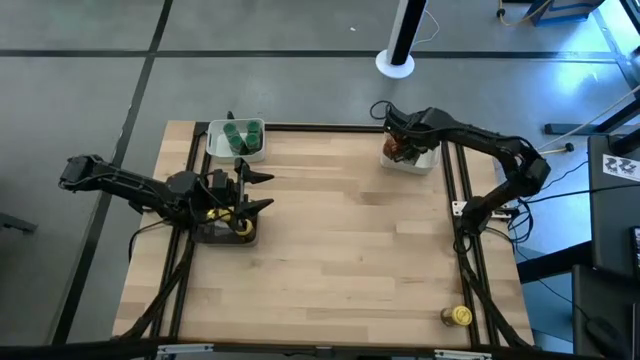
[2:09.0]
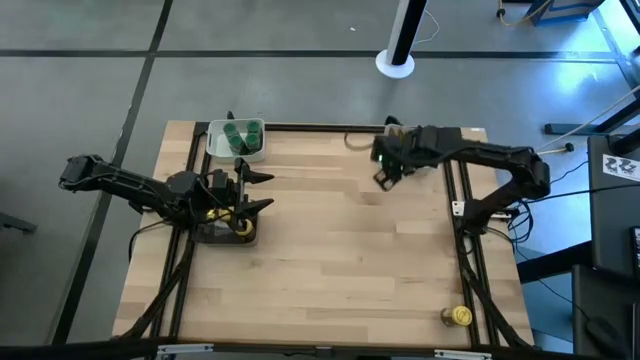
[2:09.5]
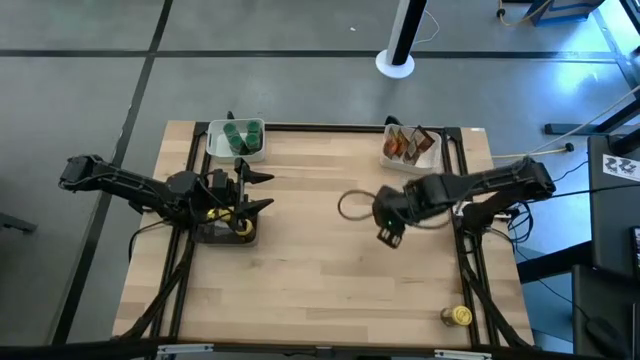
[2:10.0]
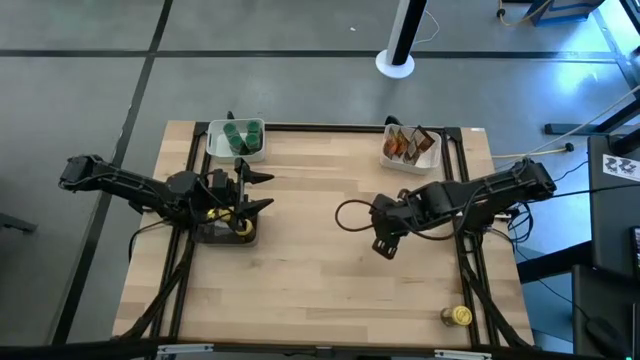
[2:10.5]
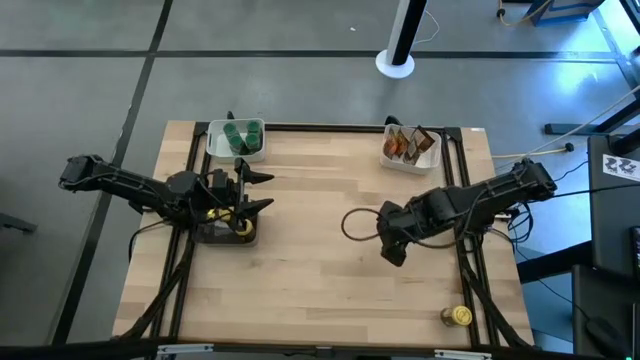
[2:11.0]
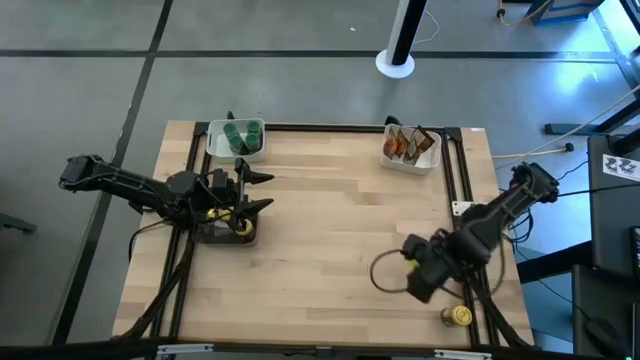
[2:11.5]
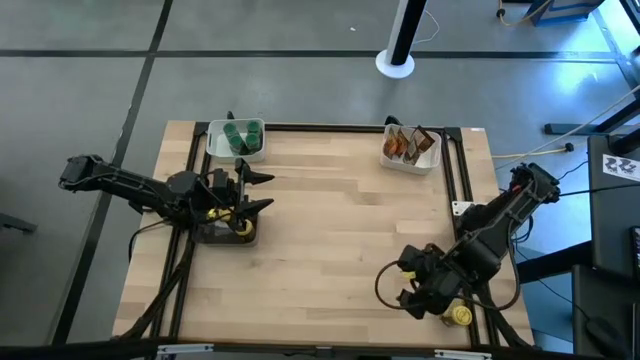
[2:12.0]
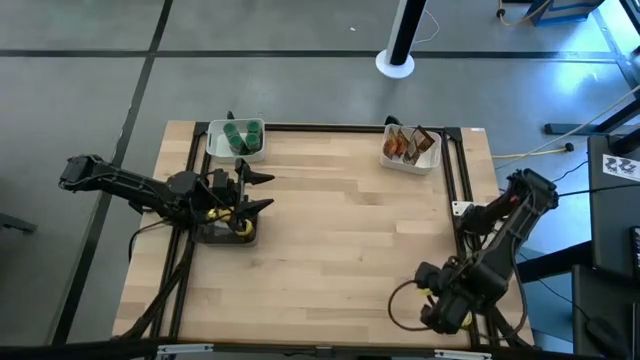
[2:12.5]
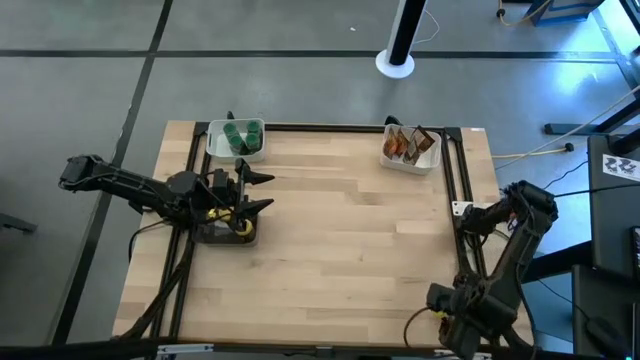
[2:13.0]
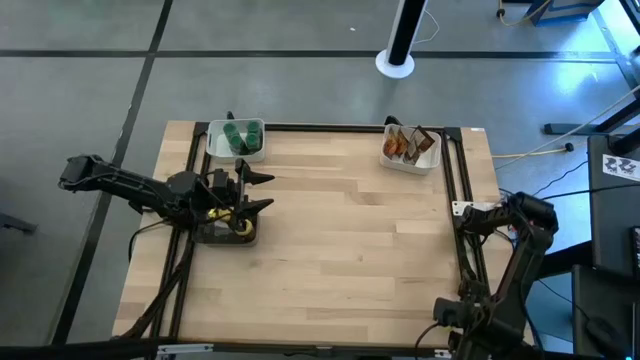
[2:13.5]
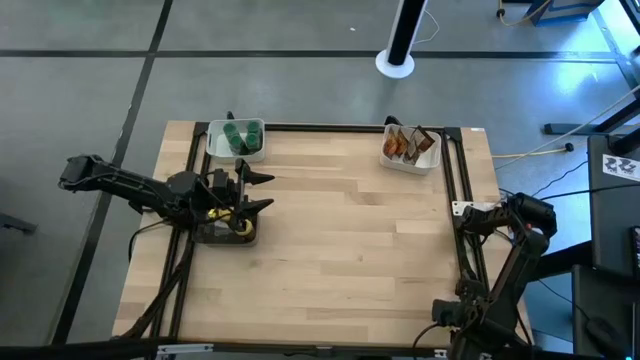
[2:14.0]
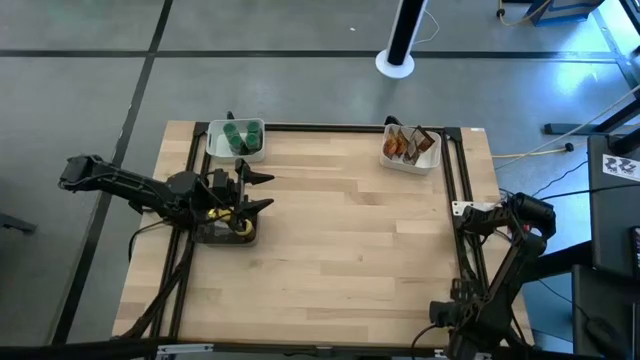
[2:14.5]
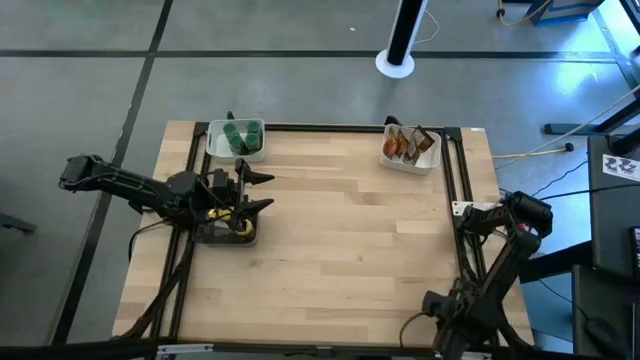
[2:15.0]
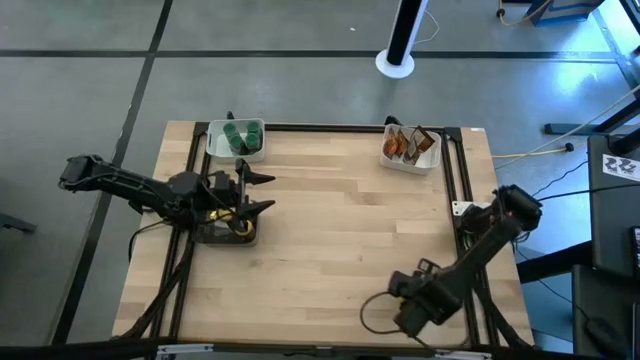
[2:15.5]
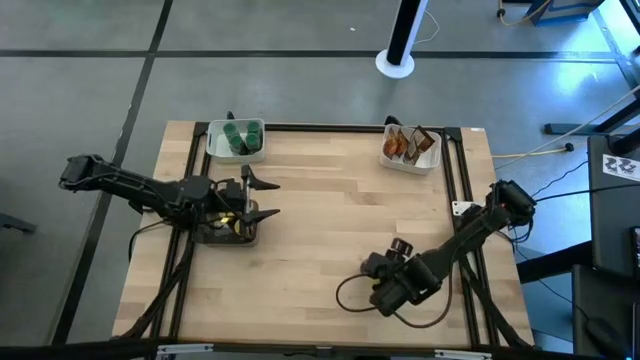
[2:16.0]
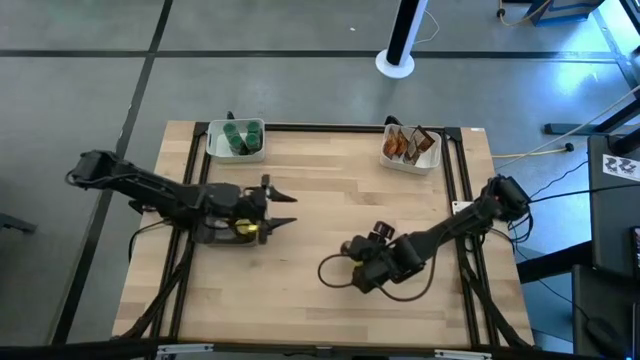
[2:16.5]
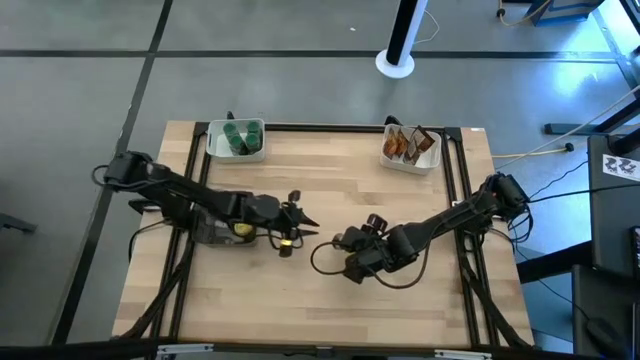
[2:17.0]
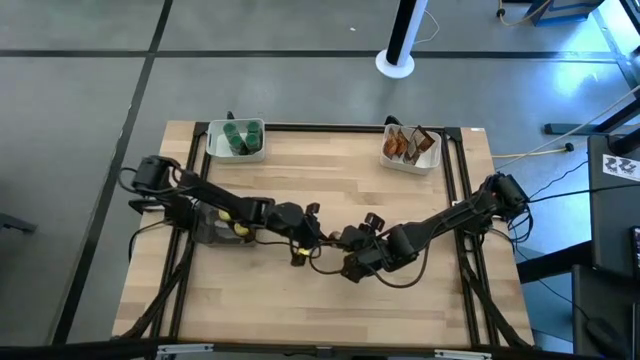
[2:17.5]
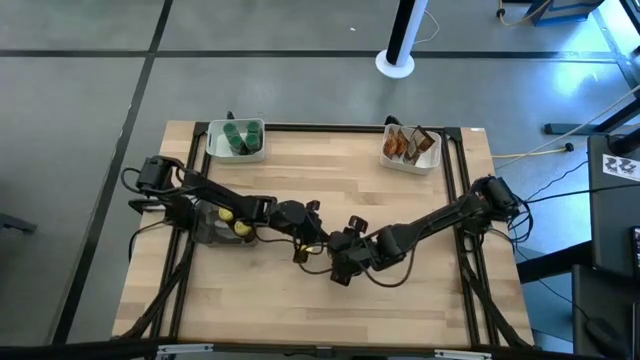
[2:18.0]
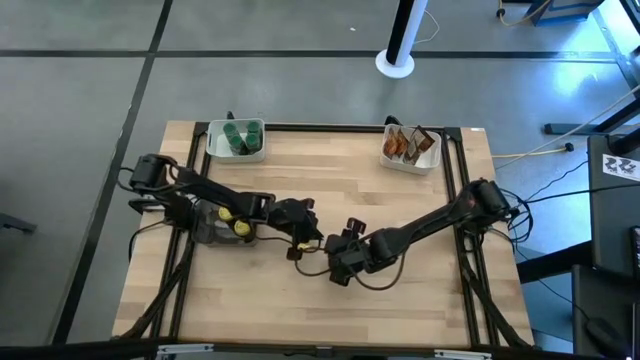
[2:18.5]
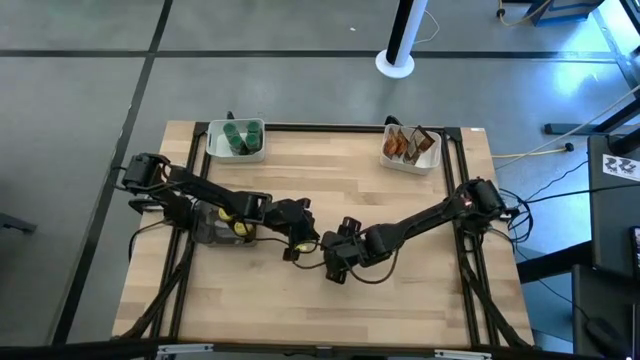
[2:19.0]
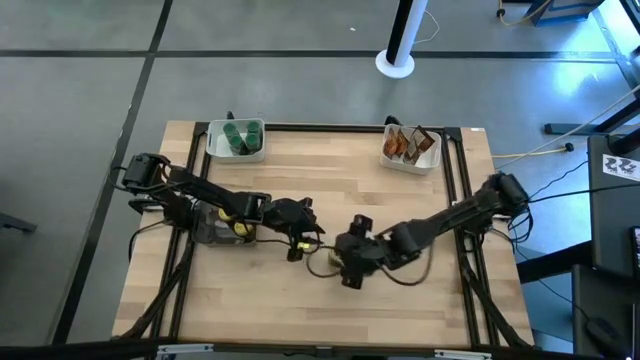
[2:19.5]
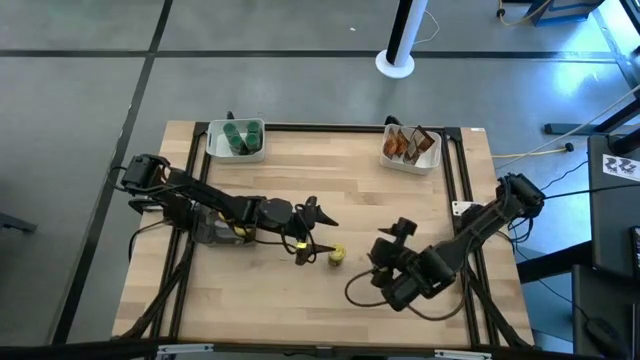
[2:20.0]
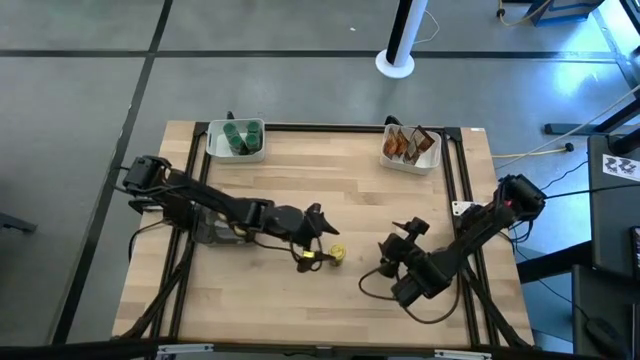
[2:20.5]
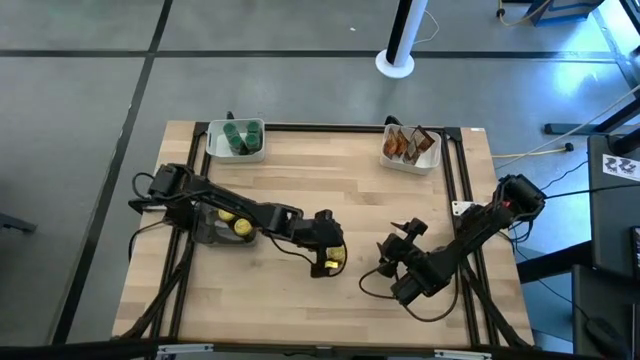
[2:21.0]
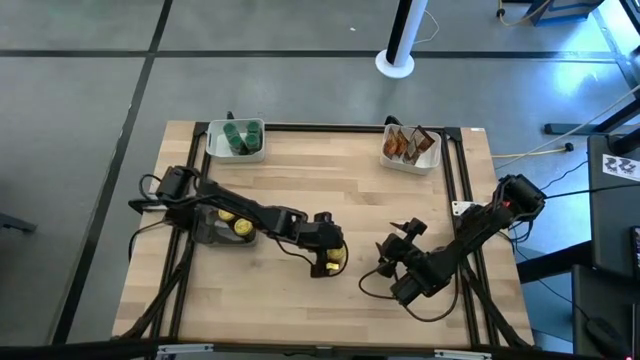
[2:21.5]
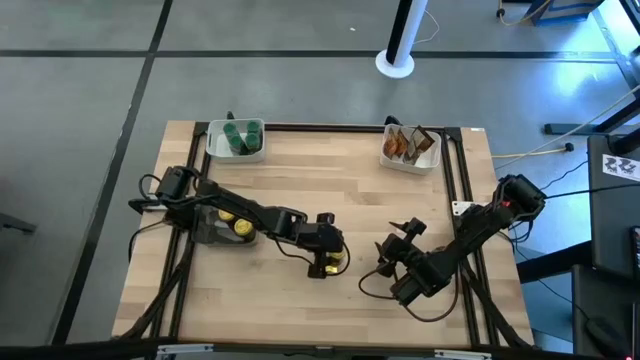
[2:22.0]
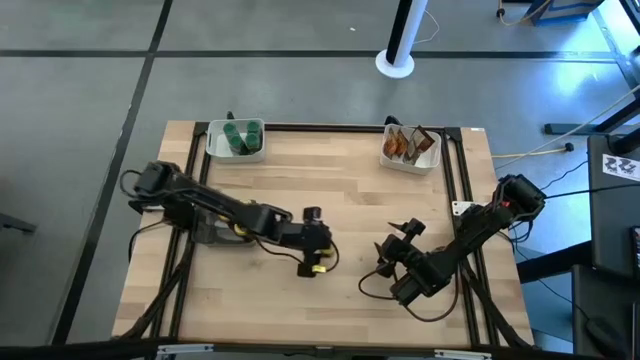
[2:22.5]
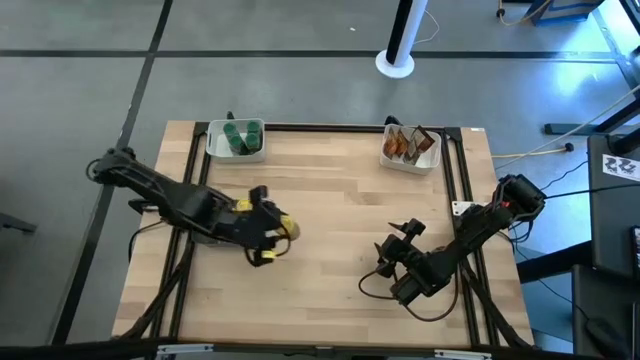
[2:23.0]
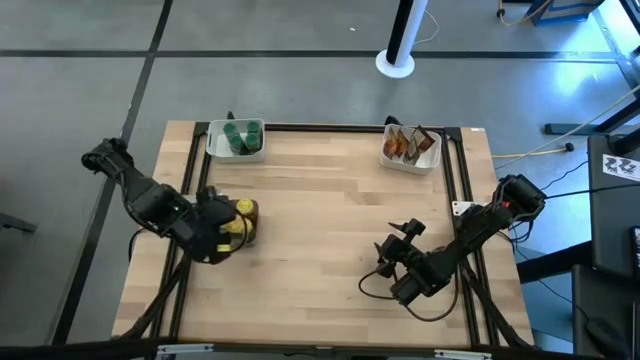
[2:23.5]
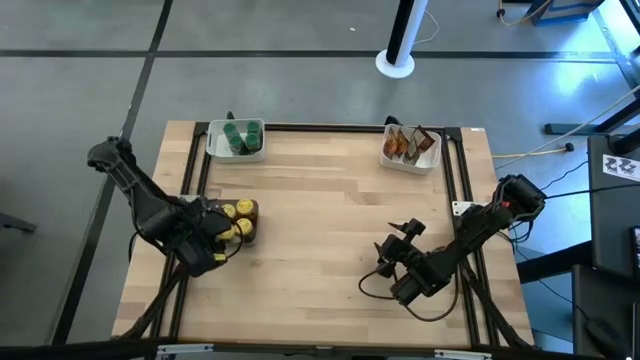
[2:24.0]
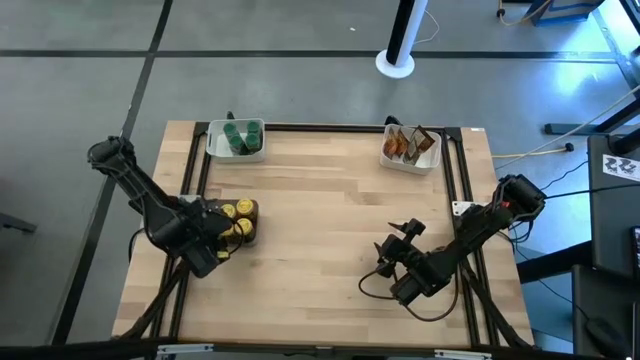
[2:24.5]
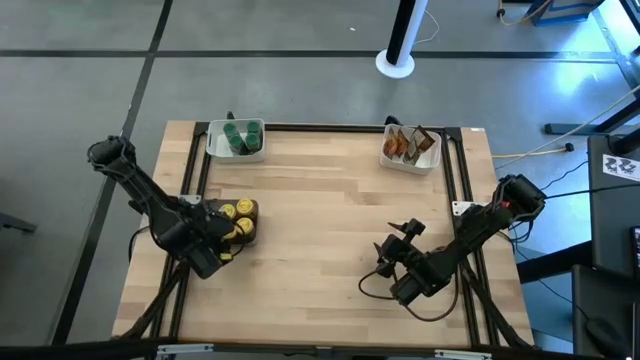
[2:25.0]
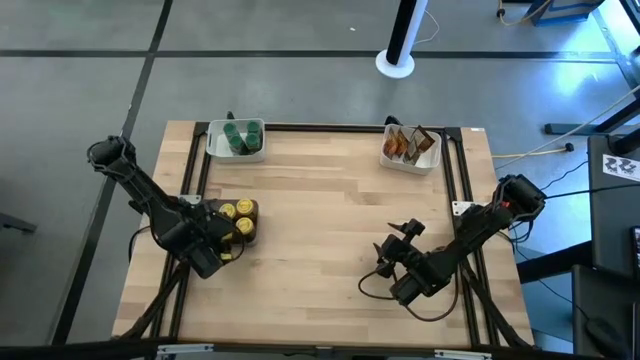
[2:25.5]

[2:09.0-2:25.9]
Task: Sort spices by type
Put the yellow seasoning bottle into the black bin

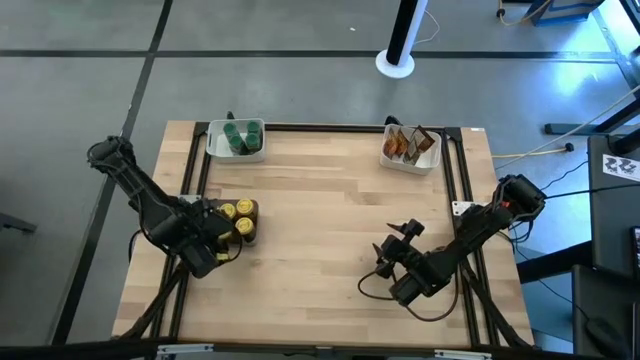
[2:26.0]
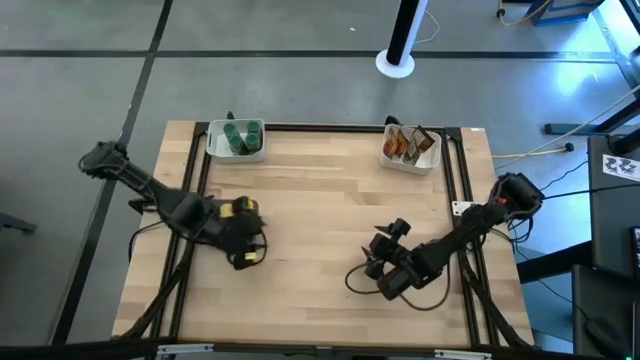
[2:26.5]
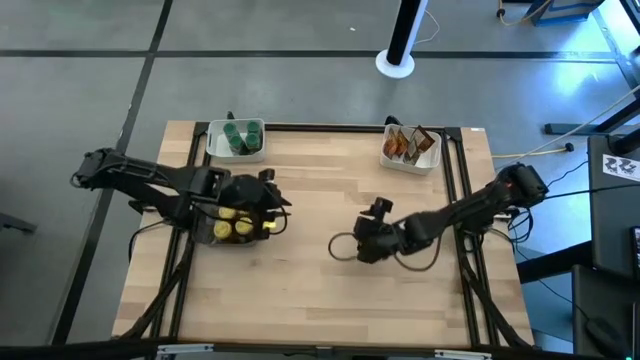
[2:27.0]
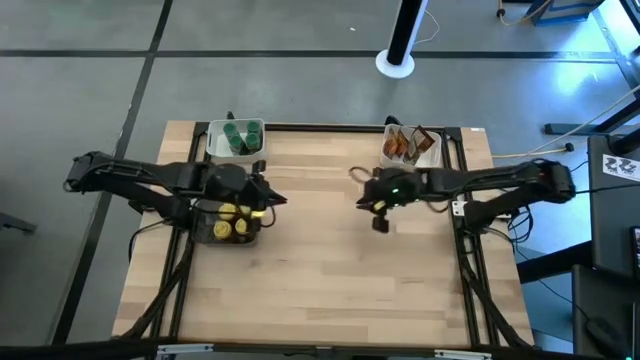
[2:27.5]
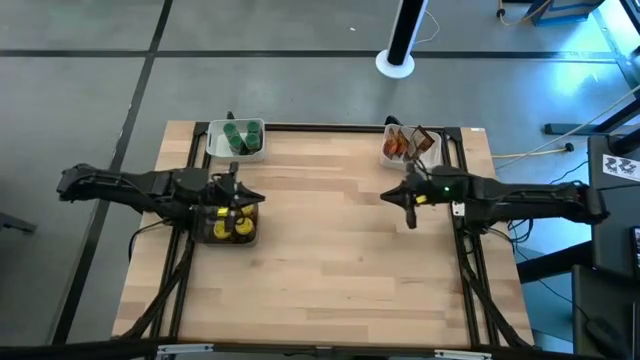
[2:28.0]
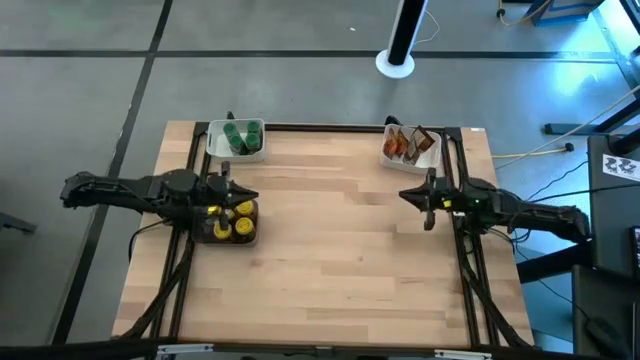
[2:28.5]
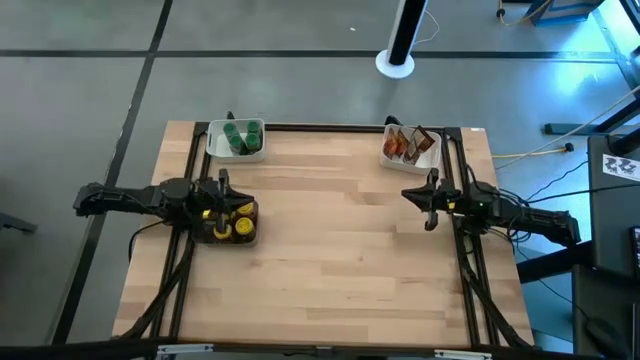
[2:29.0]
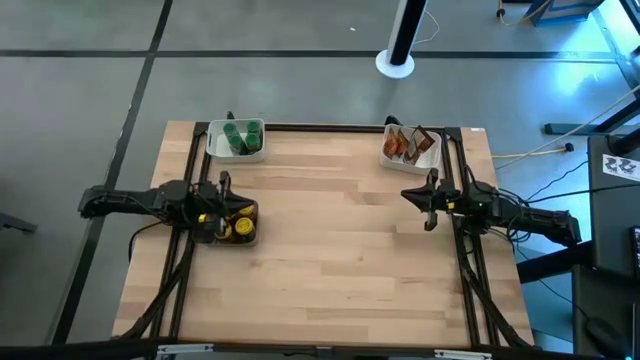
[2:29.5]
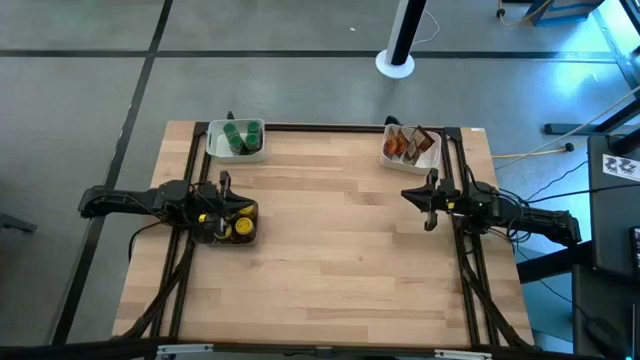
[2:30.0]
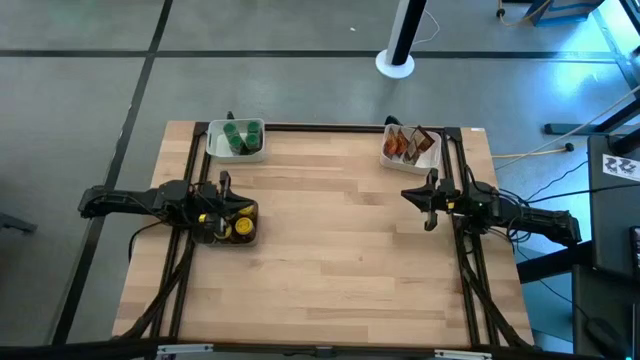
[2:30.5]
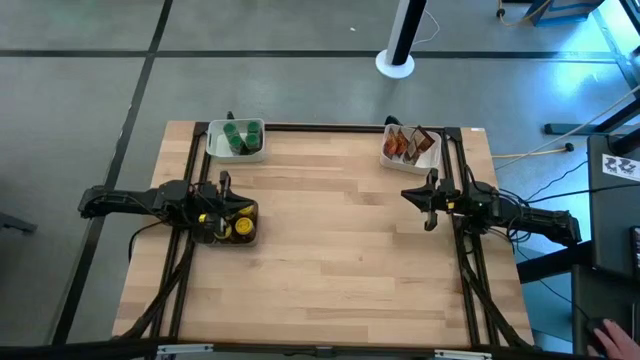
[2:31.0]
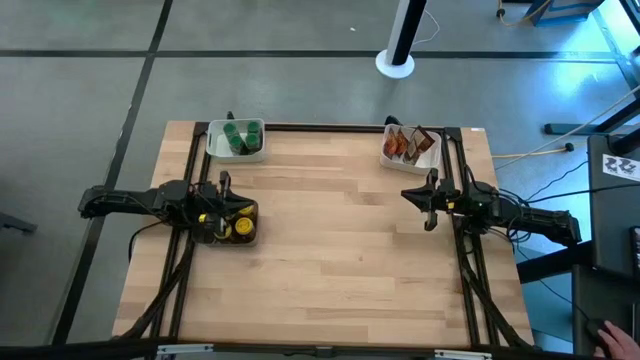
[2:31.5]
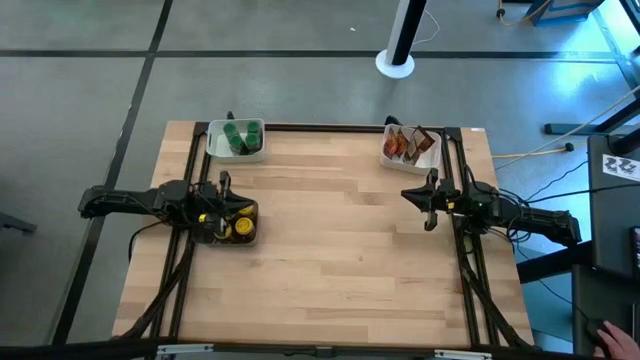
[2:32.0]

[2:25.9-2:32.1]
Return to Home Position
